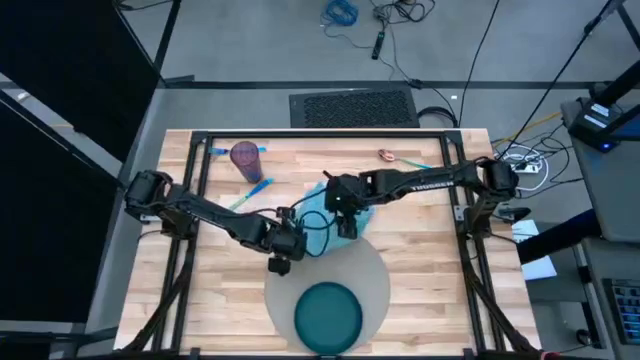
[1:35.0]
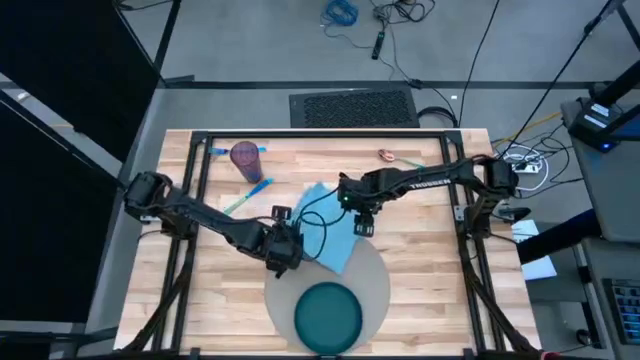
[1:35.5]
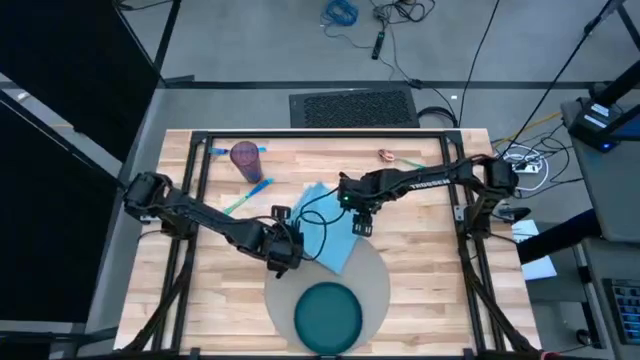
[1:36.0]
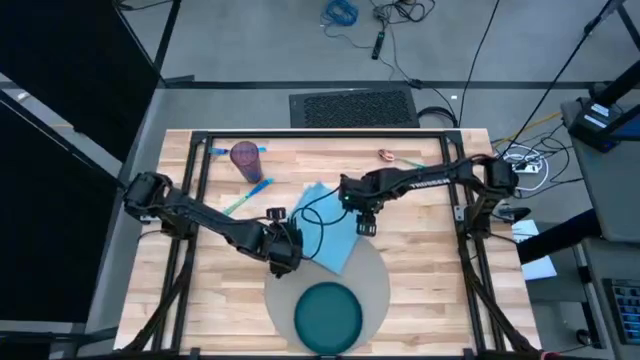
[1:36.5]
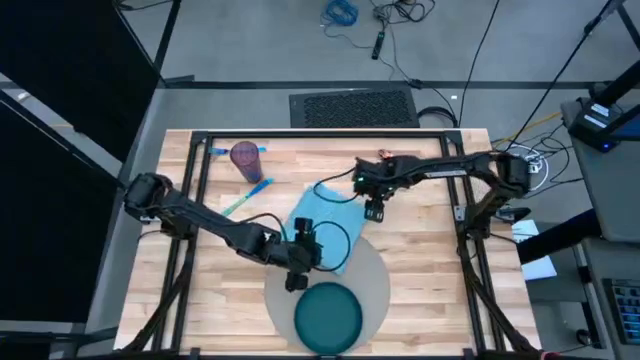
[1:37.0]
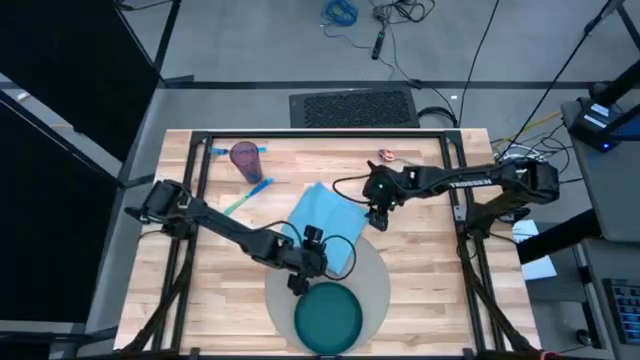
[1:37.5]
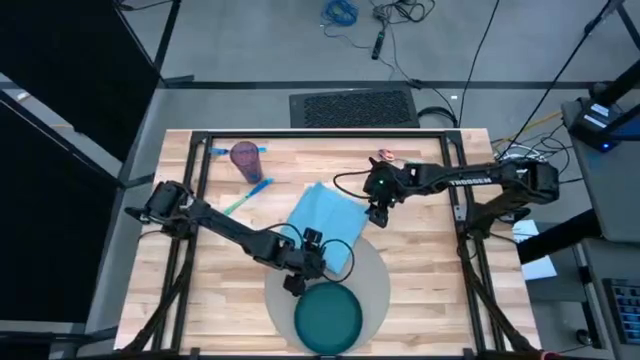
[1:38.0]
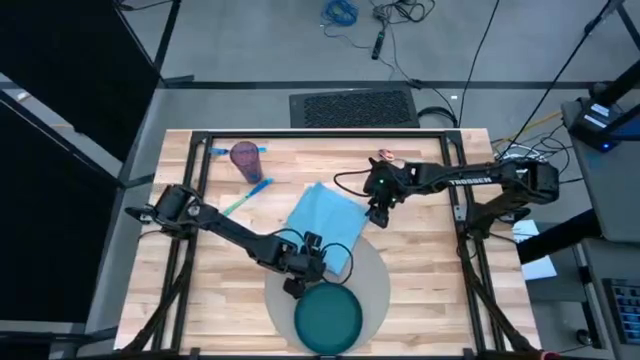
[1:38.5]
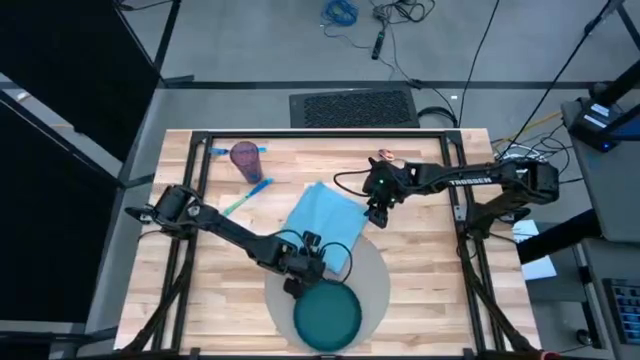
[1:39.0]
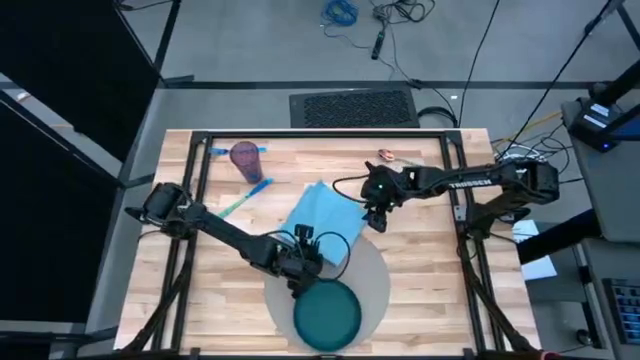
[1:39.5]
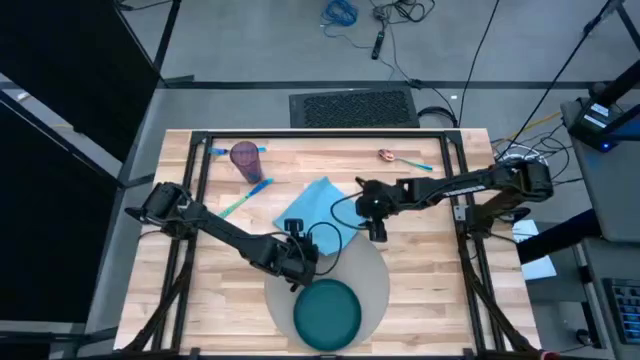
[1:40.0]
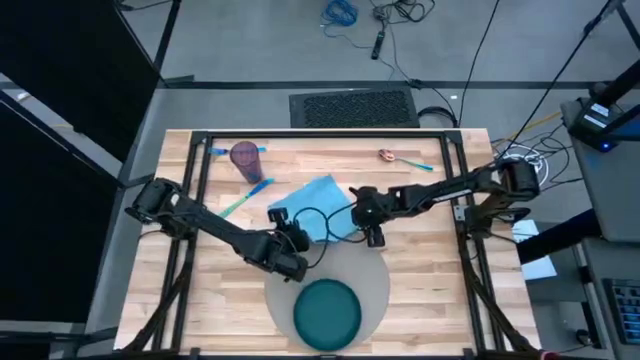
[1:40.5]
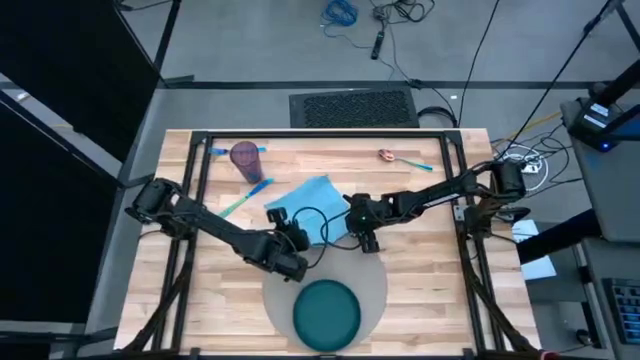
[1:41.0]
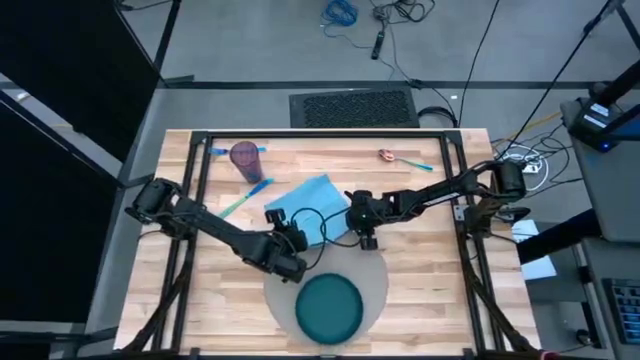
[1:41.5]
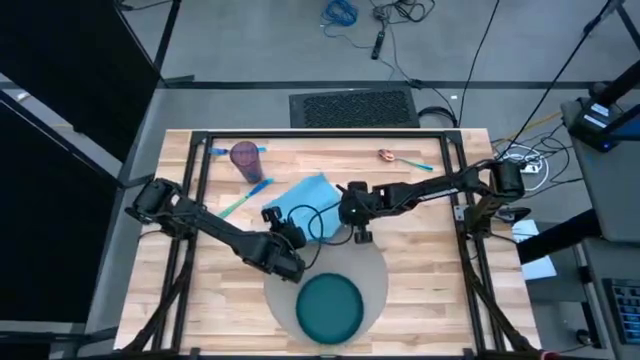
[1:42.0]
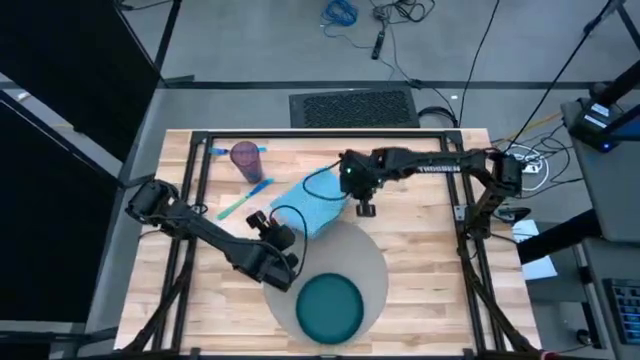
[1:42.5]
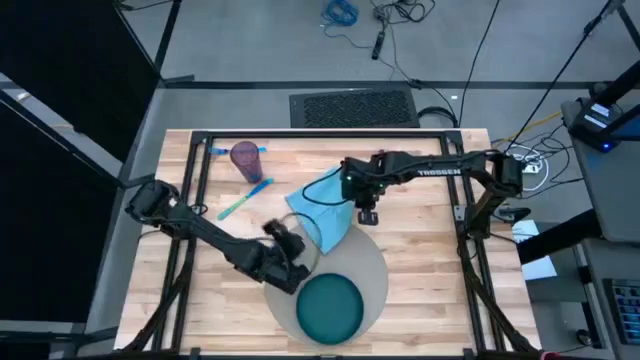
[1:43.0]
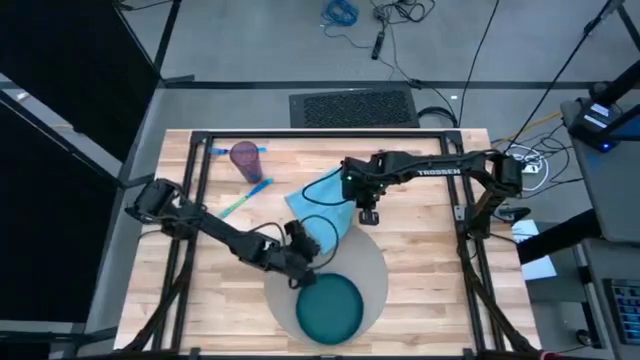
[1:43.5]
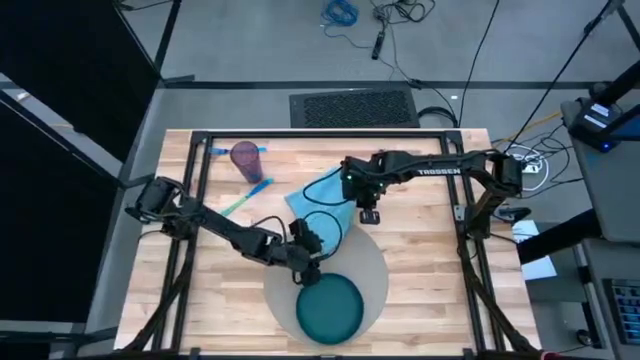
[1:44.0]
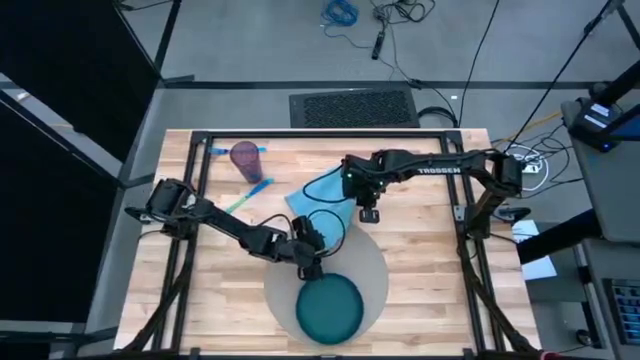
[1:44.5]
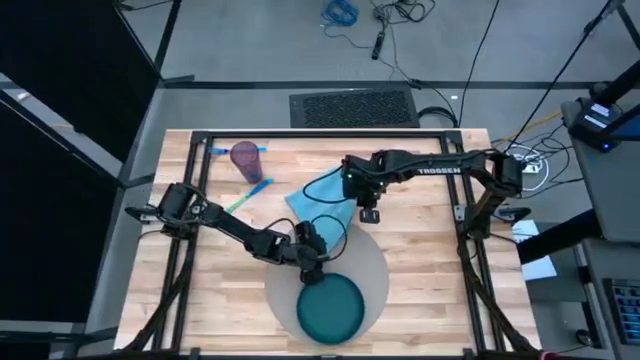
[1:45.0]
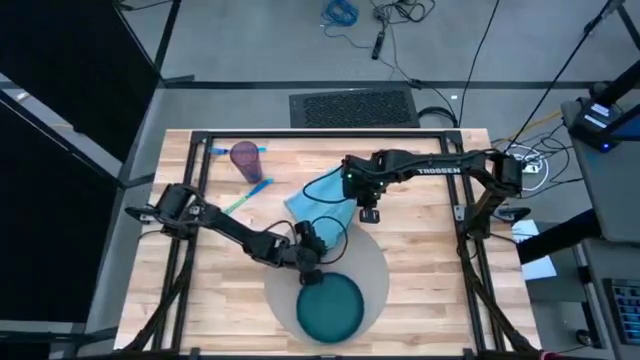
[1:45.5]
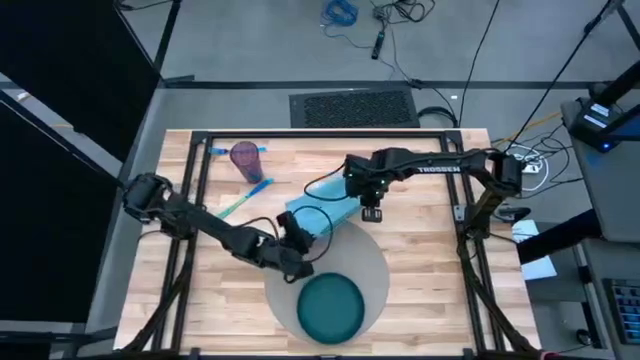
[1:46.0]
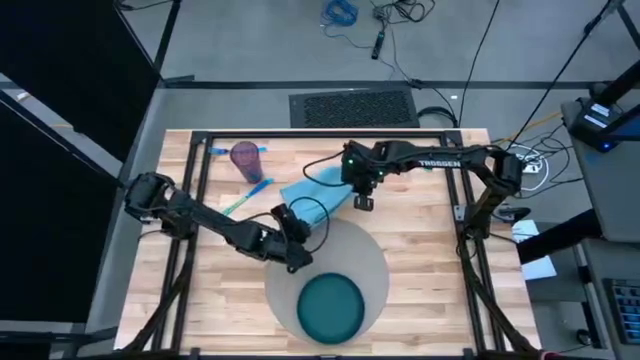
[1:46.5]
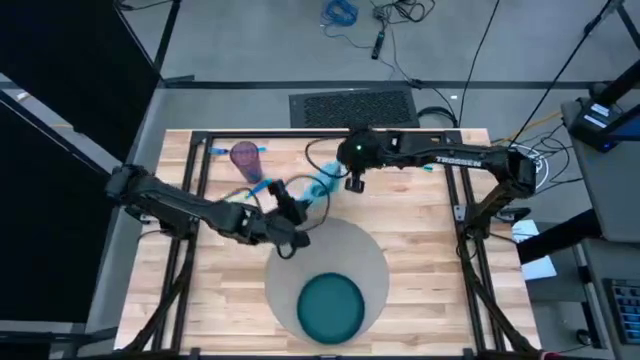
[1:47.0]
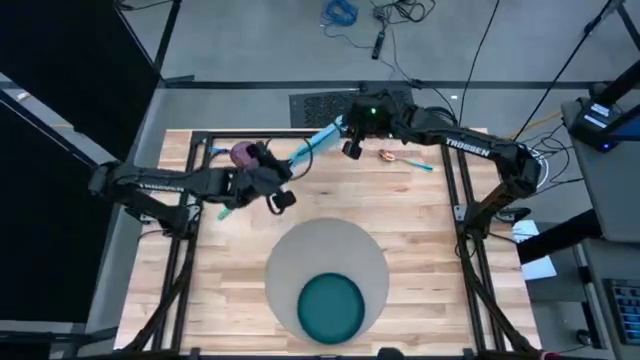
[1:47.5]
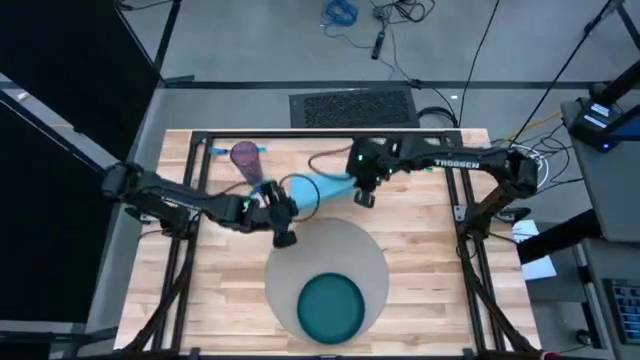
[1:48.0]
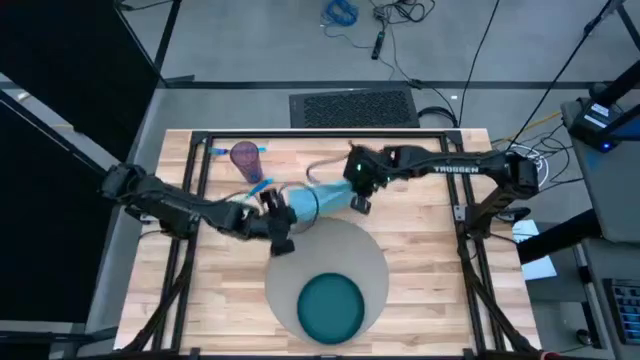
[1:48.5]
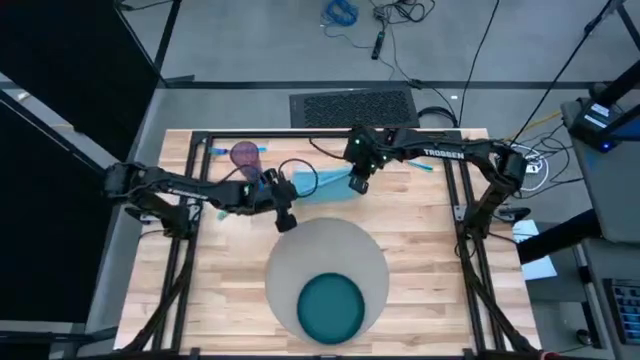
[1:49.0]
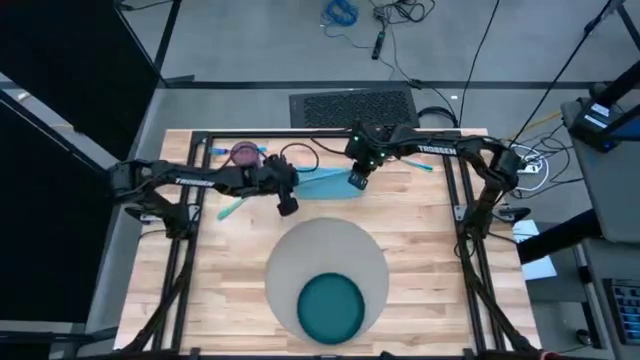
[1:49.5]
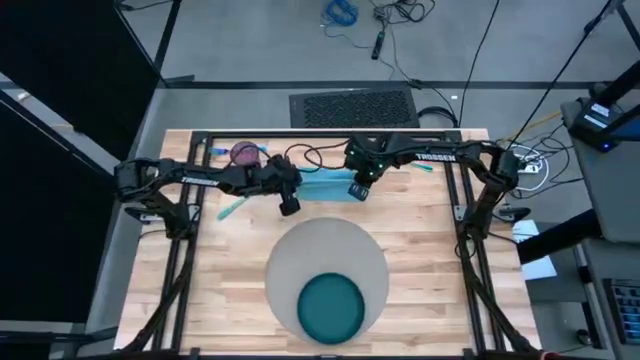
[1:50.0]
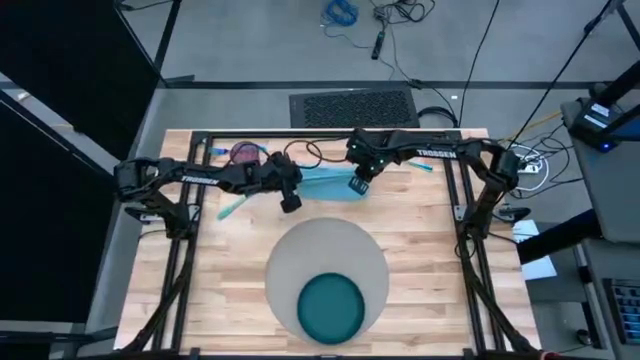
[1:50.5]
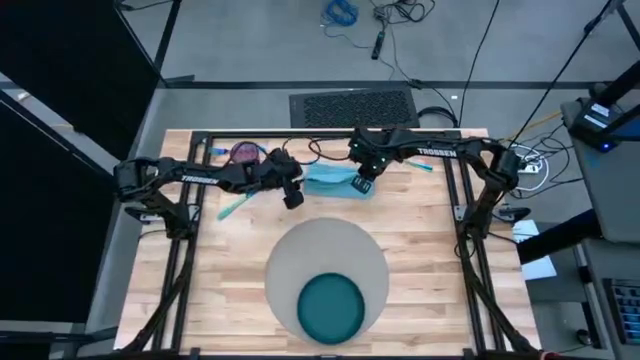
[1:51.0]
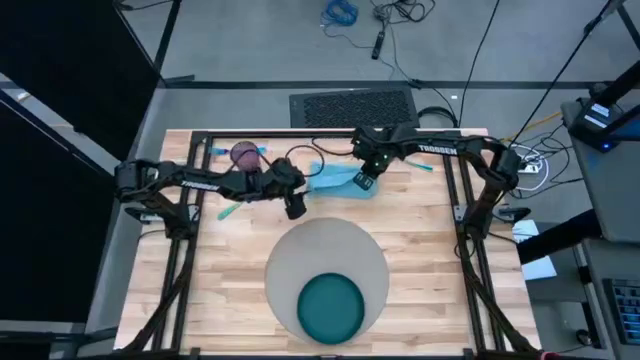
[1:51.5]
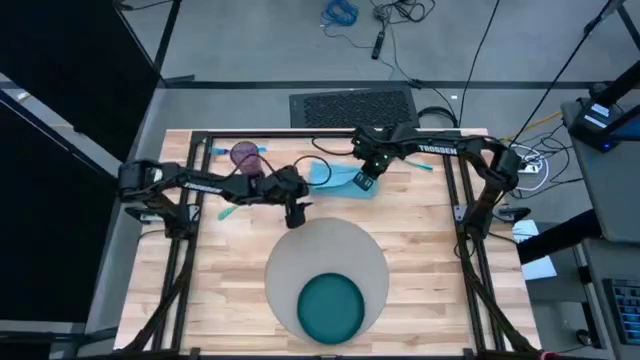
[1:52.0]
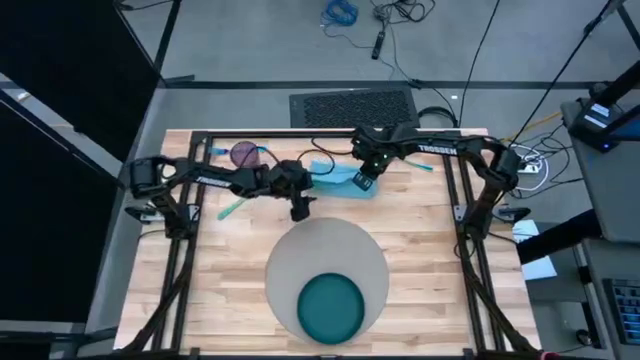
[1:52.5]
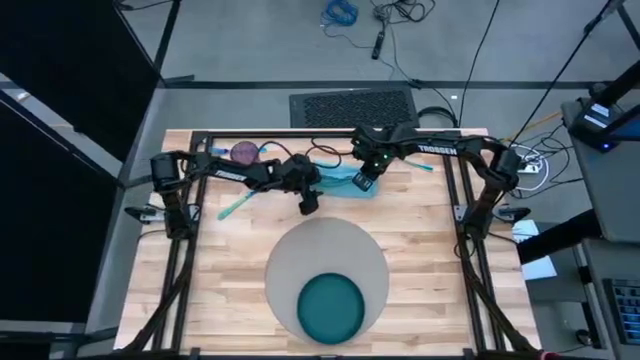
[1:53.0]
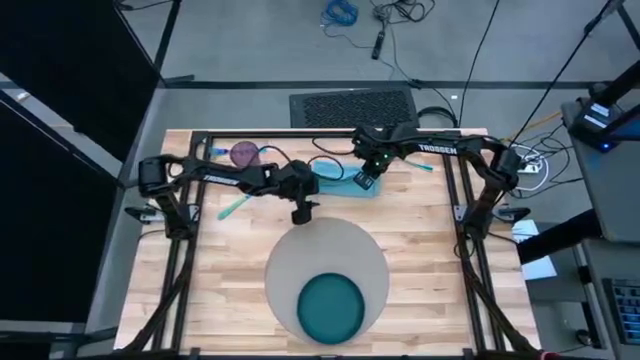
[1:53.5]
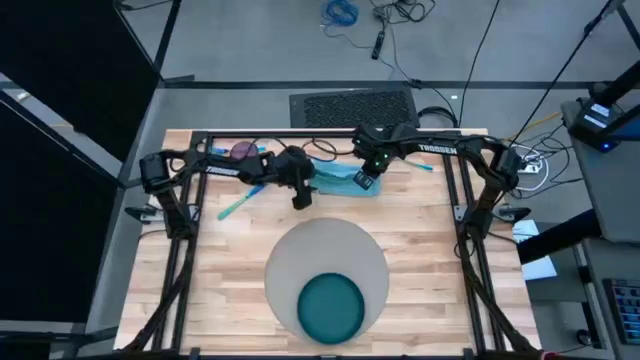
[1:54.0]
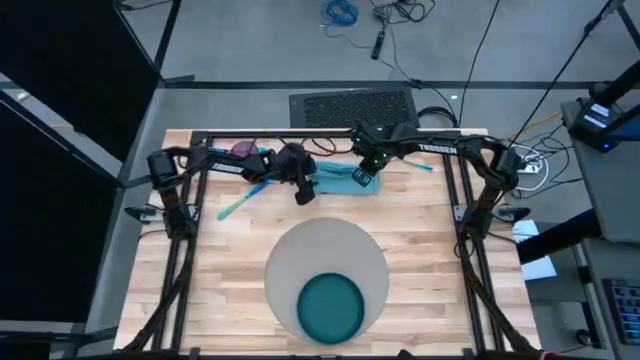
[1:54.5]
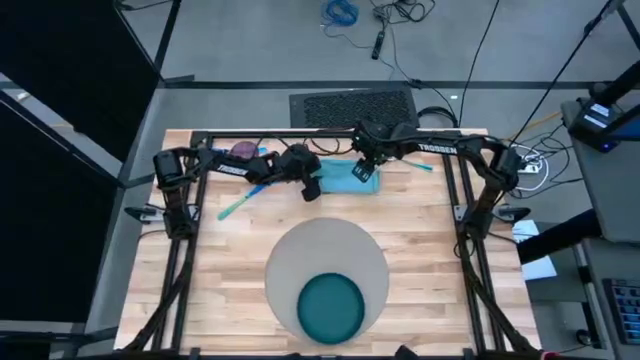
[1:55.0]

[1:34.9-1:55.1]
Task: Set table place
Fold the blue napkin

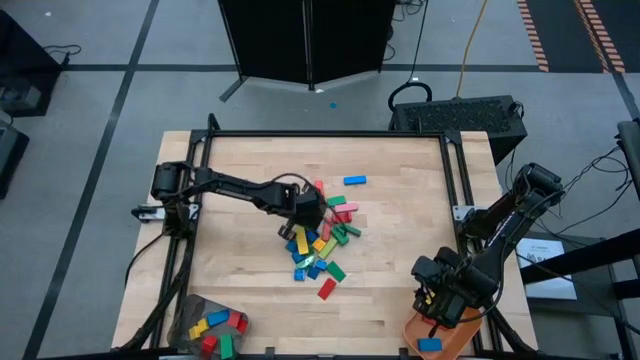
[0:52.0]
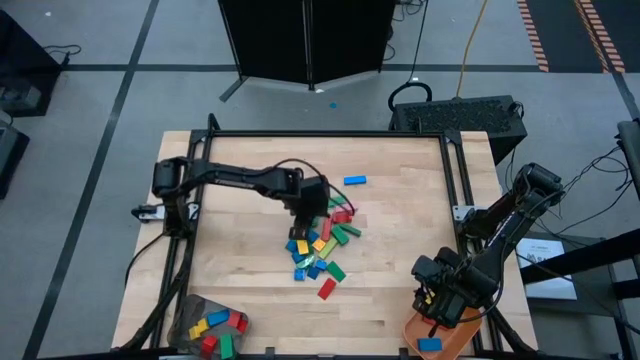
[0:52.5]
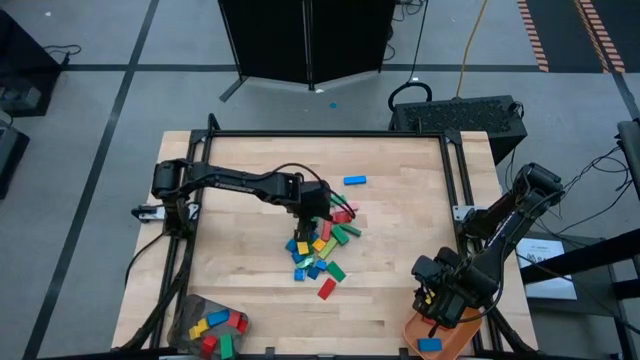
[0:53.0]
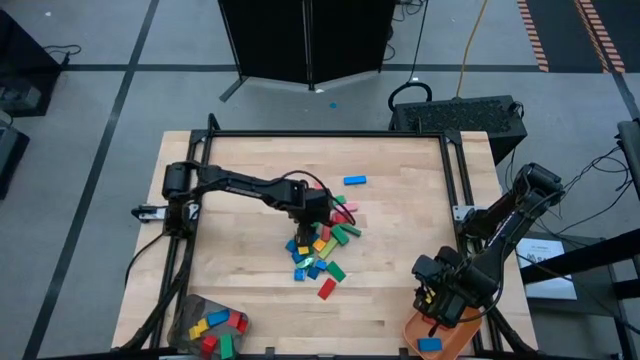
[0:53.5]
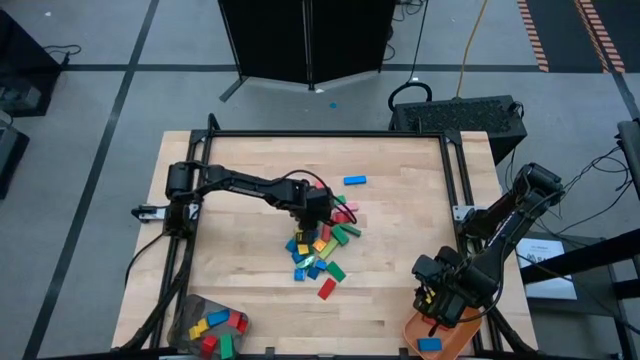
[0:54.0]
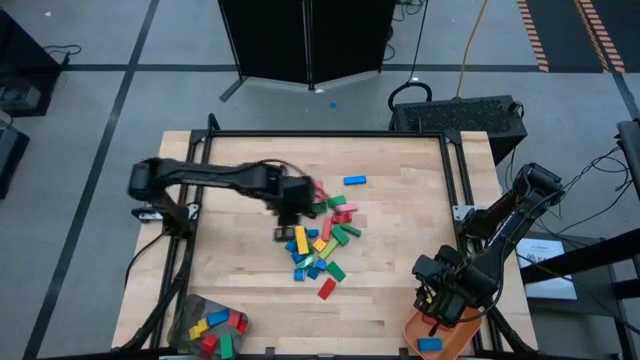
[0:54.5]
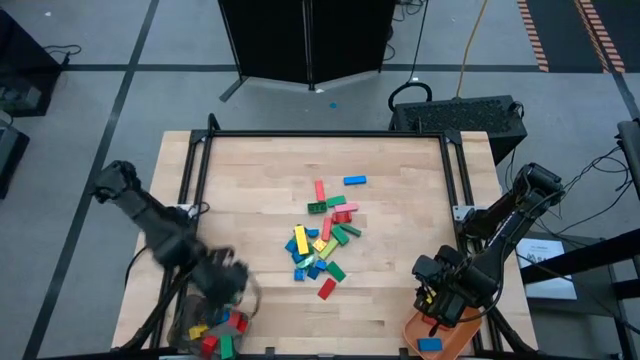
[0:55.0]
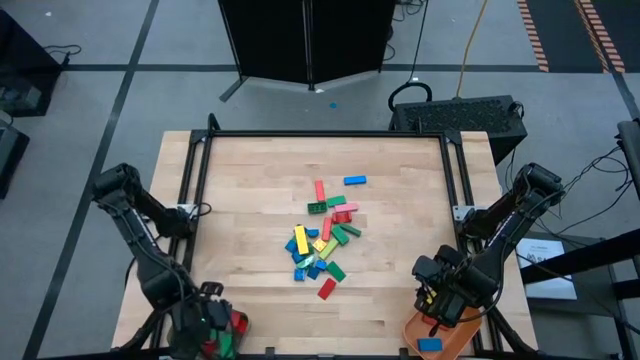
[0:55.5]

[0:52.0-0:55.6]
Task: Sort blocks by size
Put the green semicircle block into the black bin
